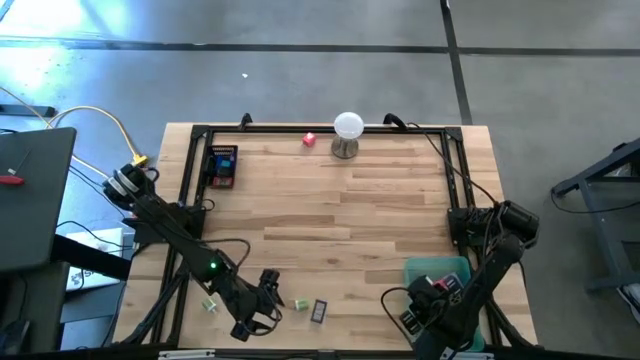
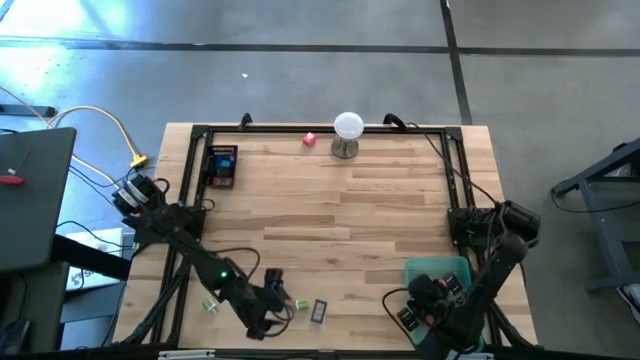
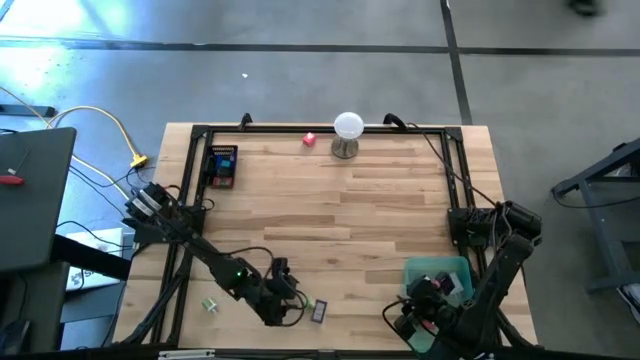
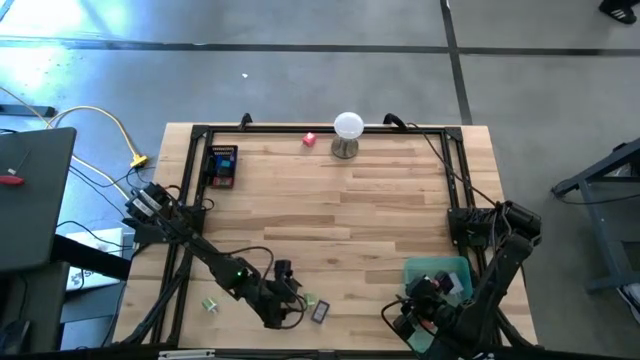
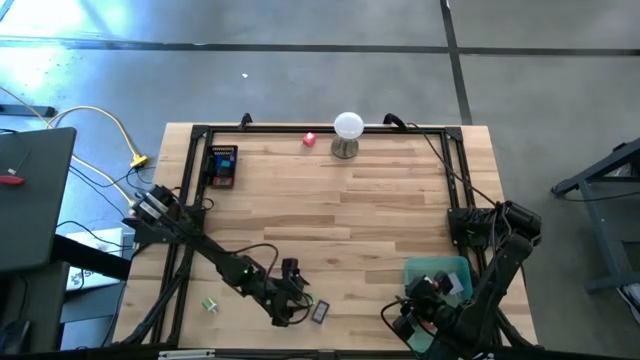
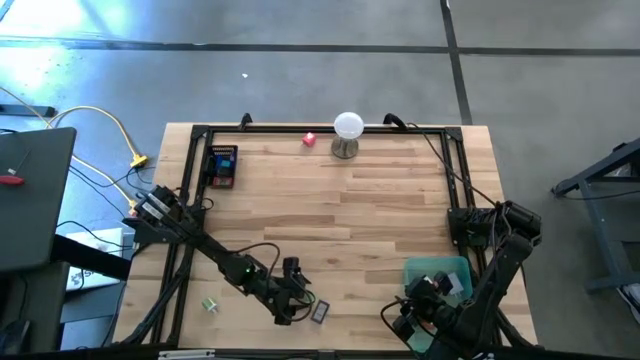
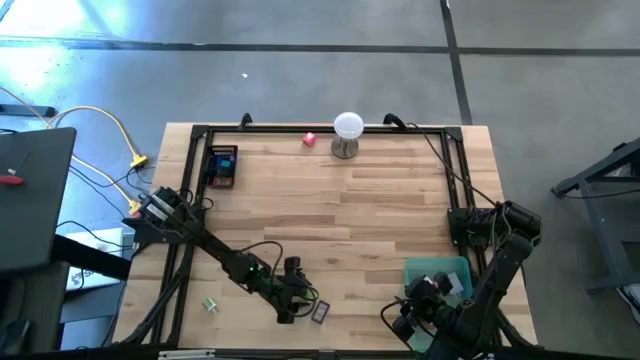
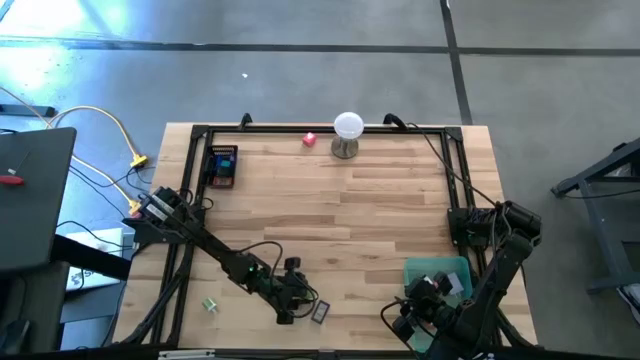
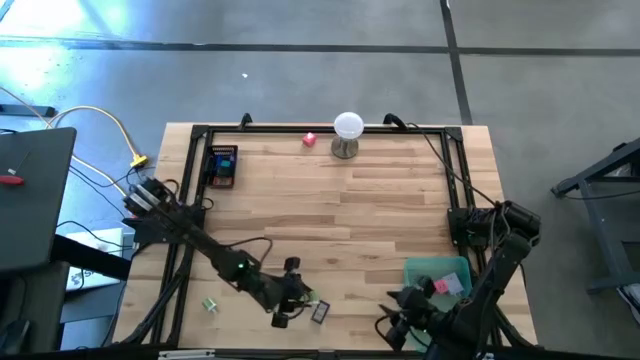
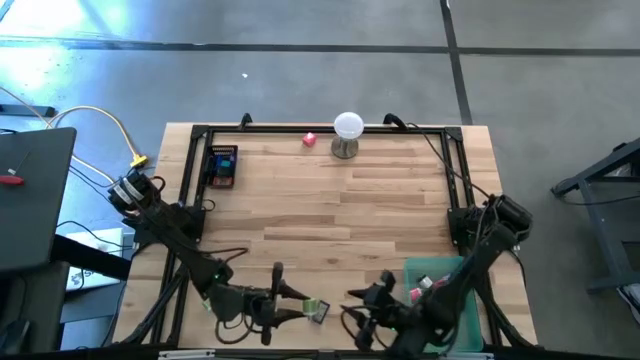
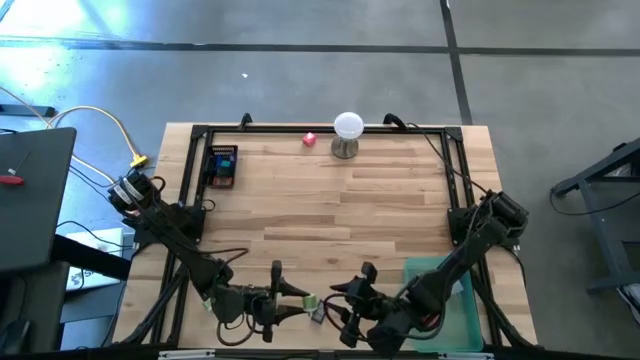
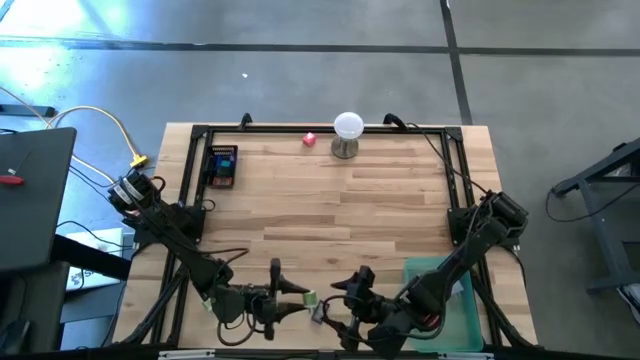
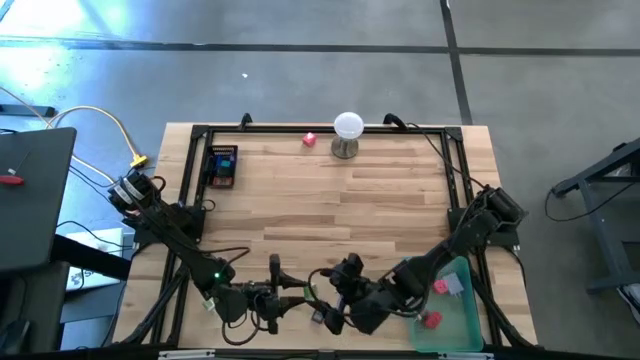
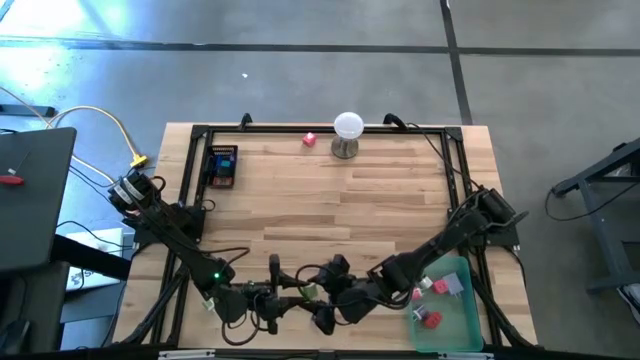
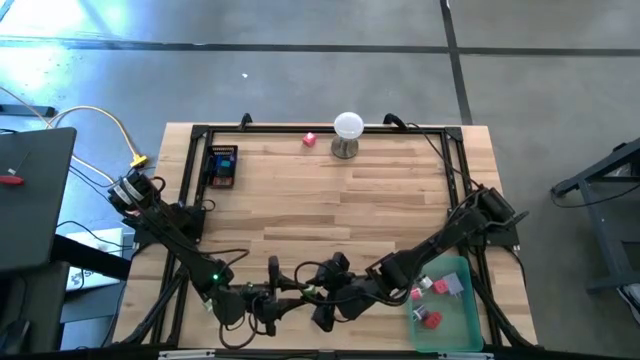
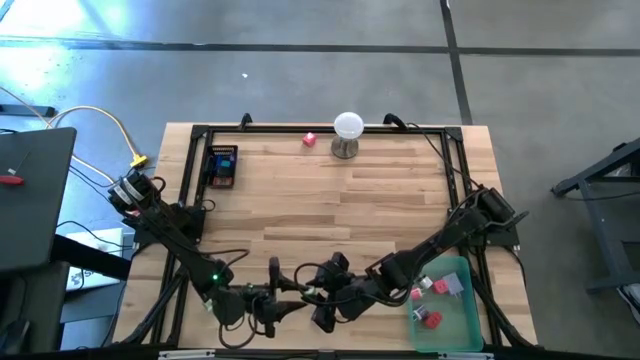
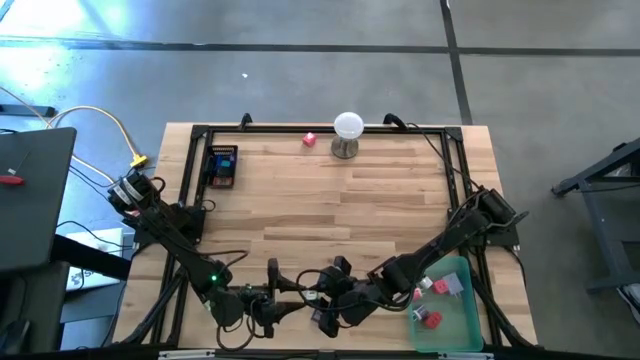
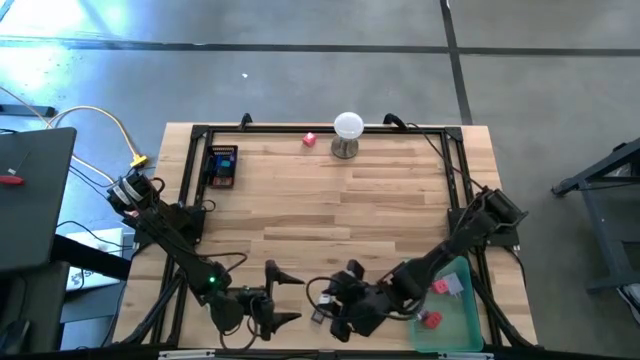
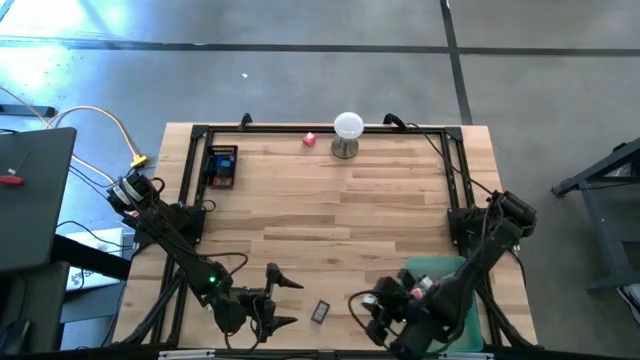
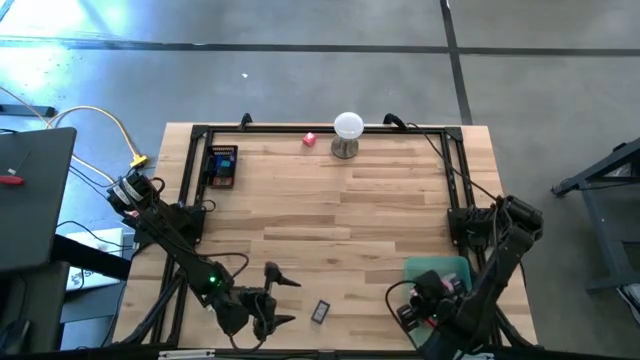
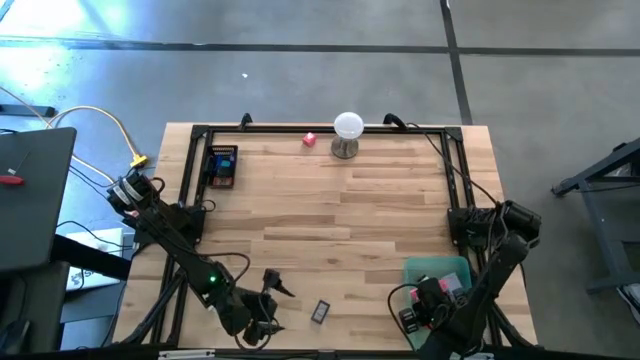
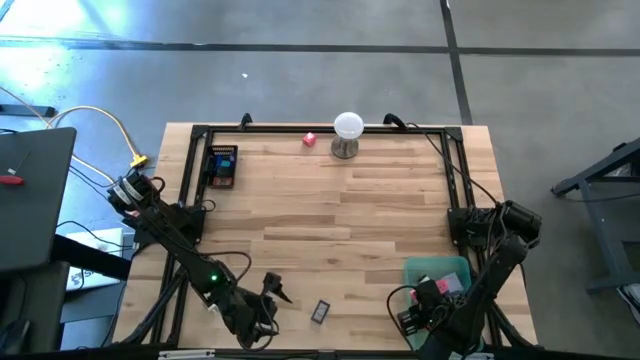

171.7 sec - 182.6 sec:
Task: Pick & Place Office items
Put the right green charger adapter into the green bin

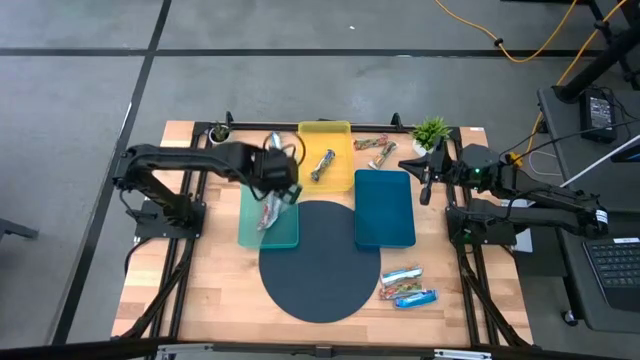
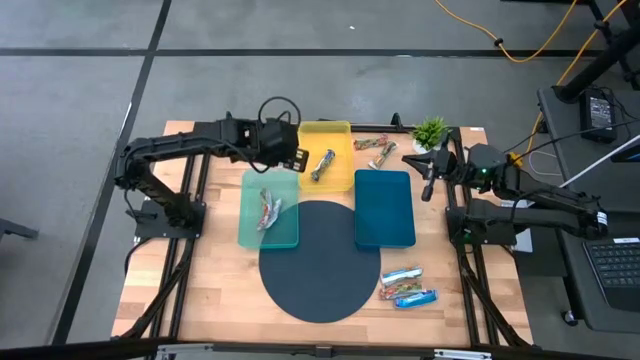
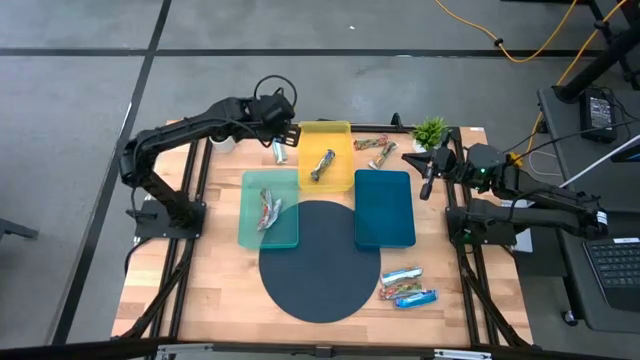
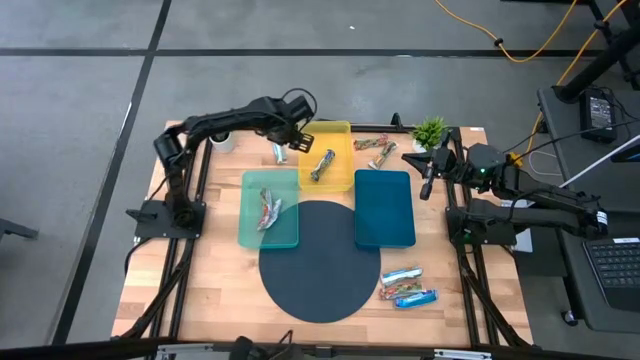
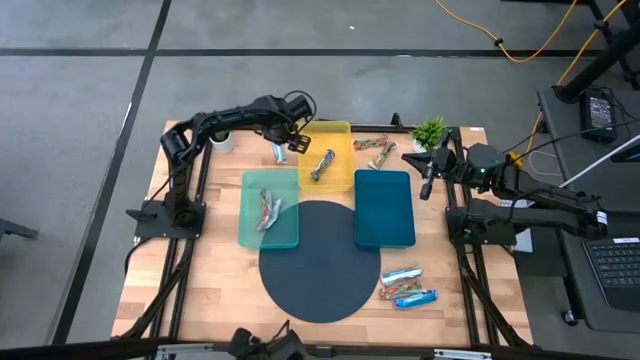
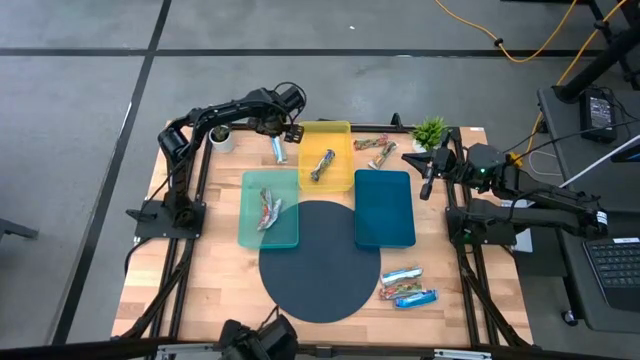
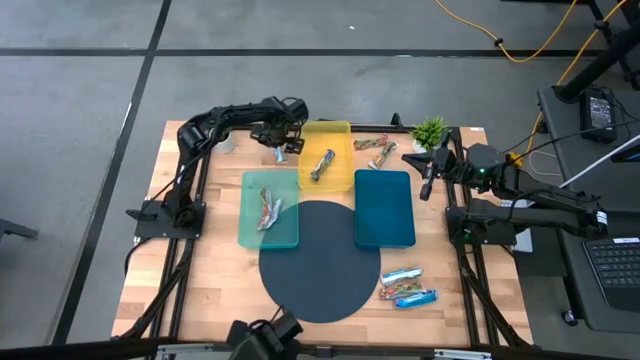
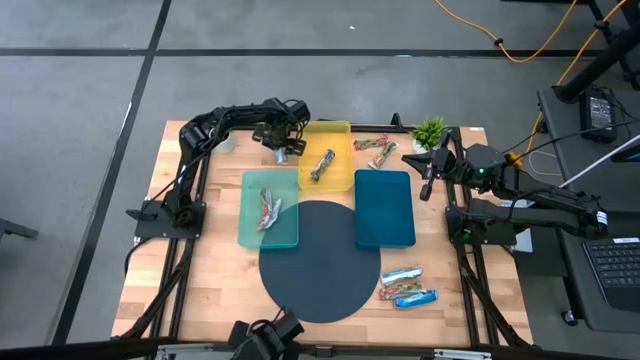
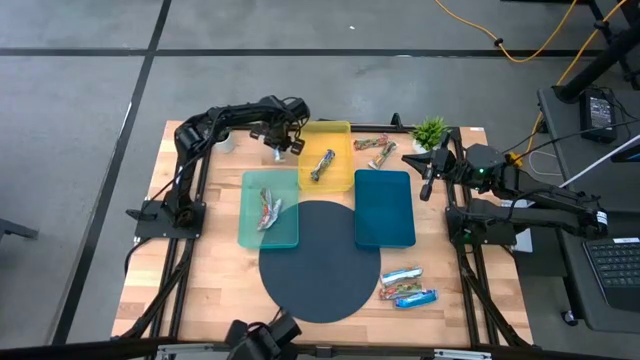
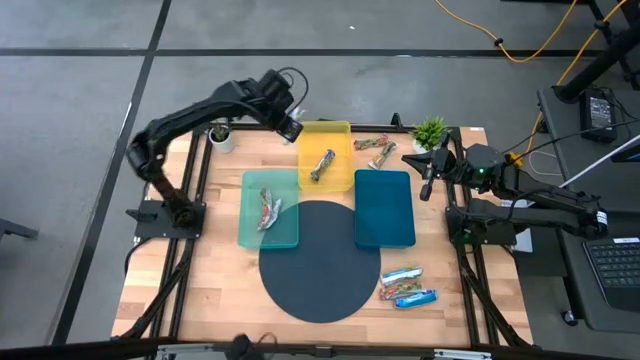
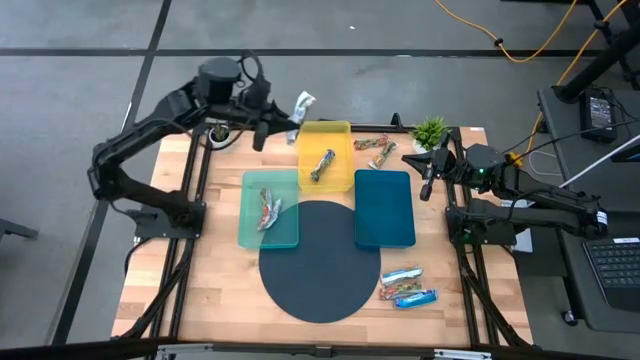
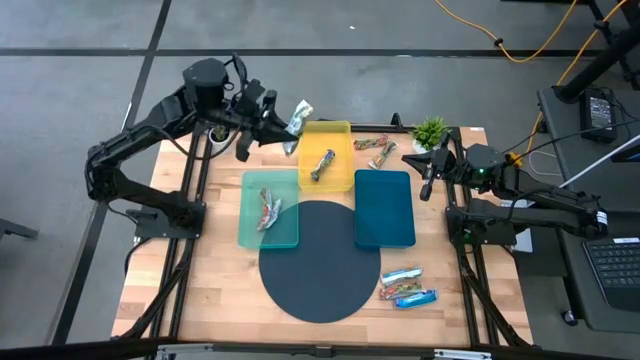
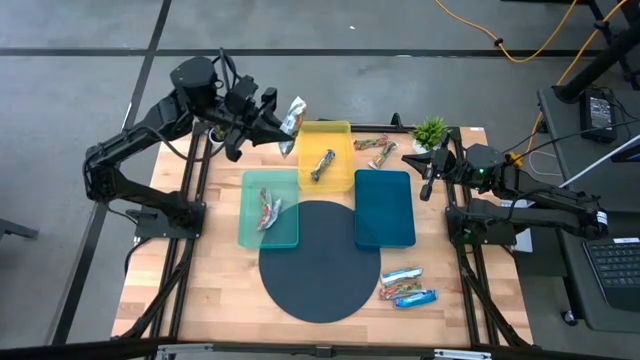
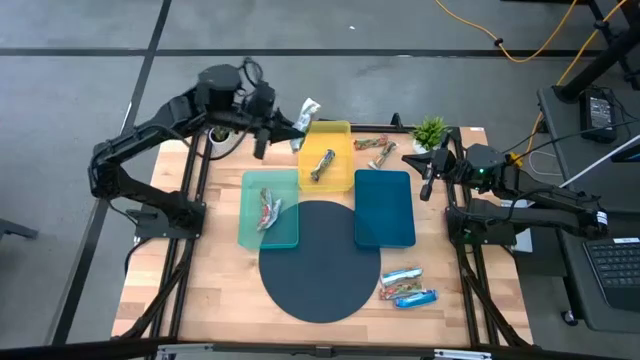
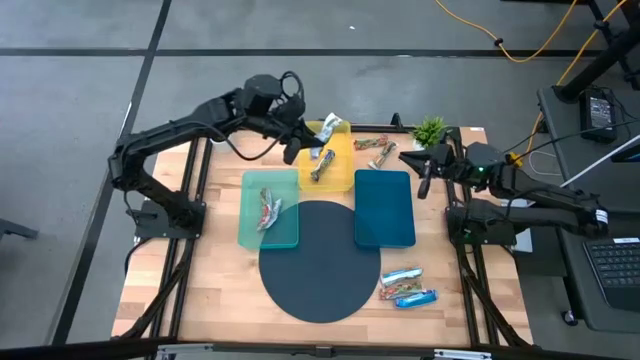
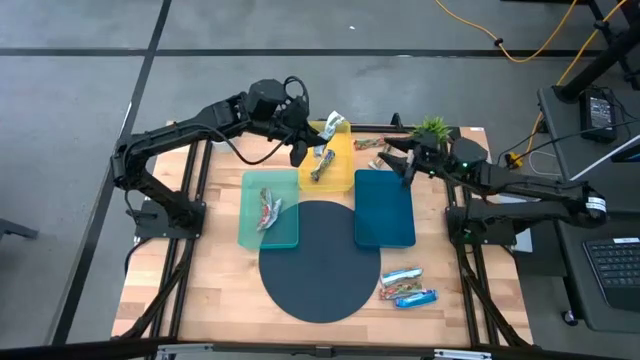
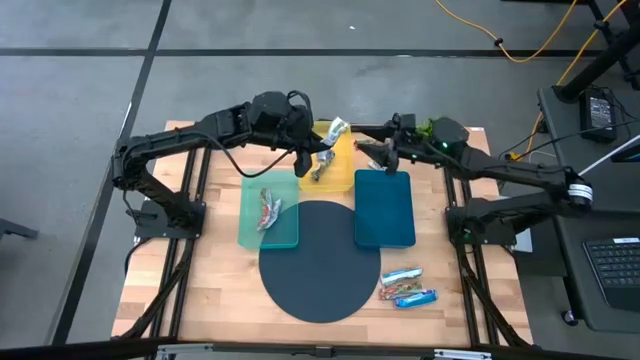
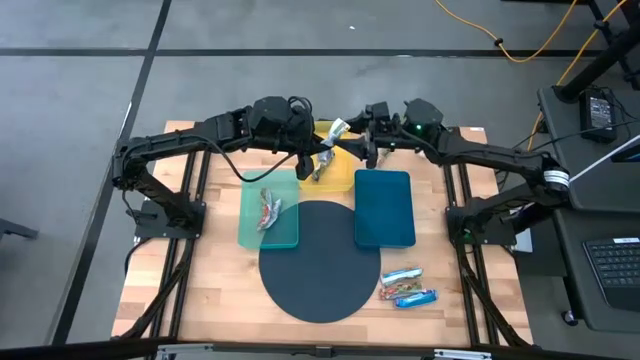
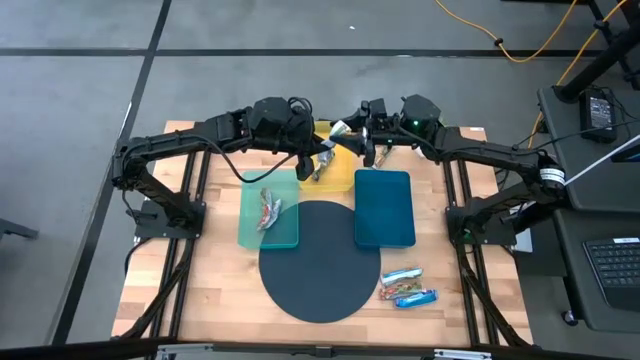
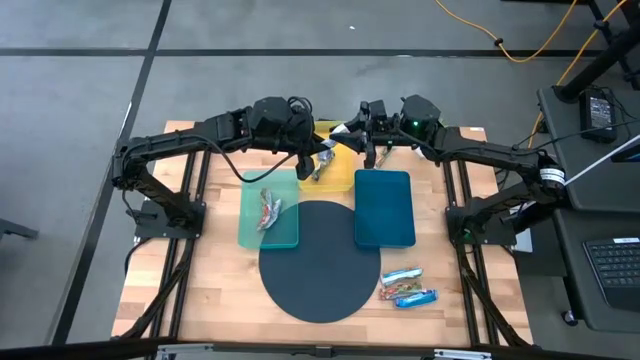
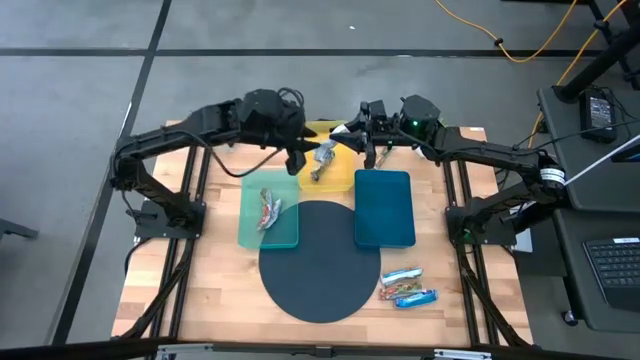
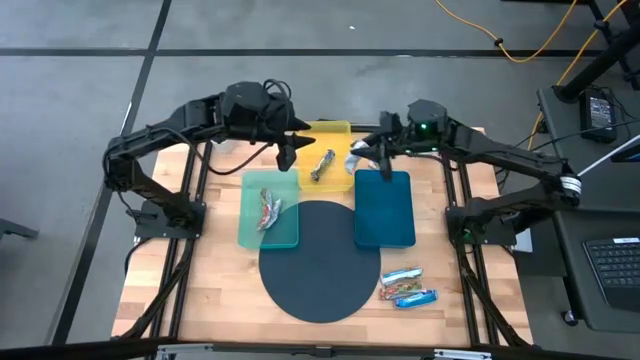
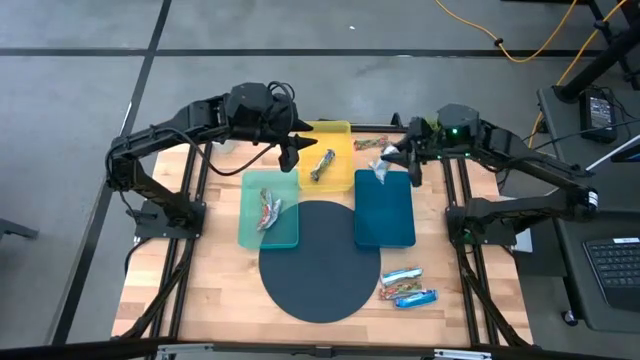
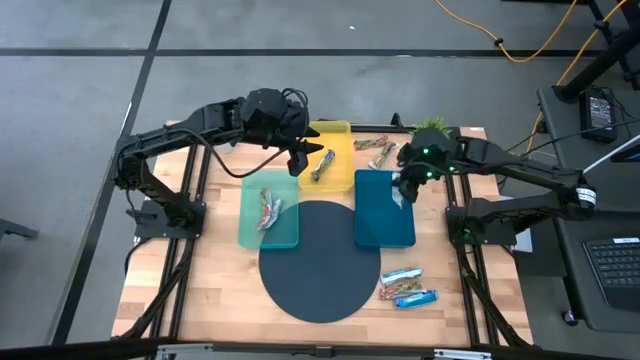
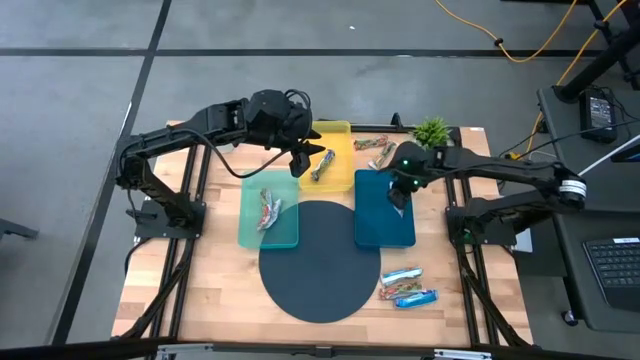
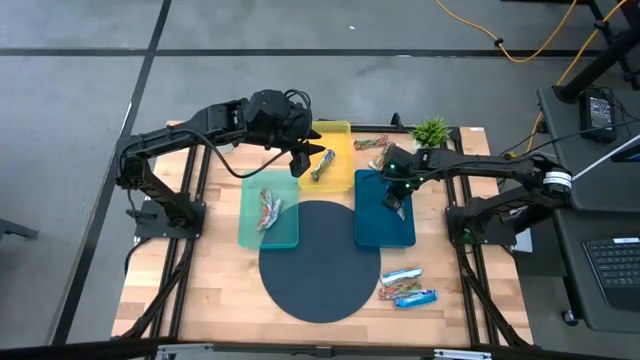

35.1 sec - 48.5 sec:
Task: Pick and place Granola Bars by type
Put the orange granola bar into the blue bin
